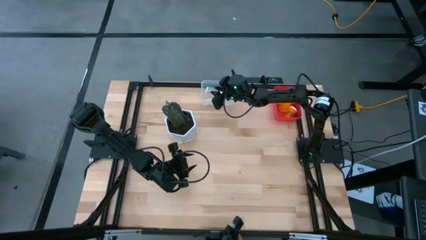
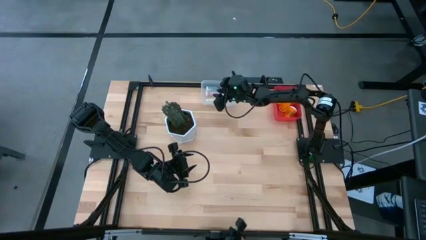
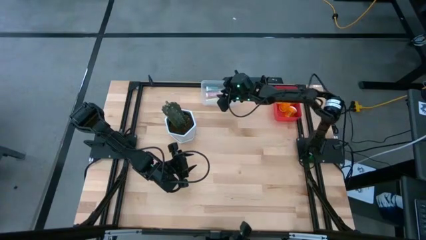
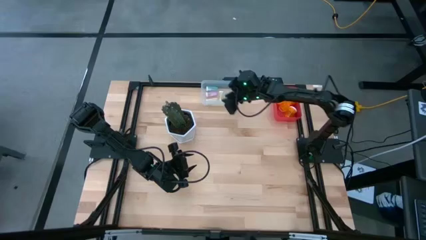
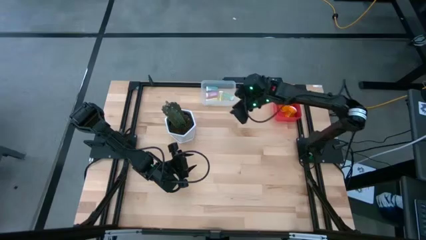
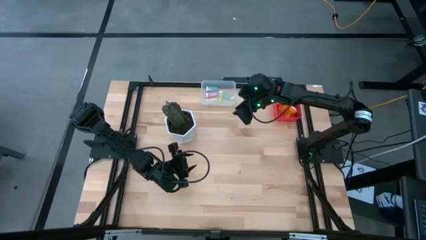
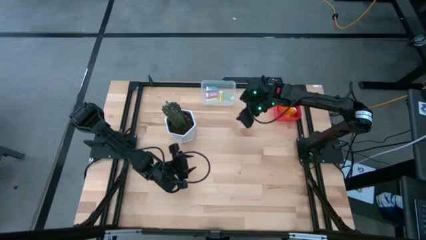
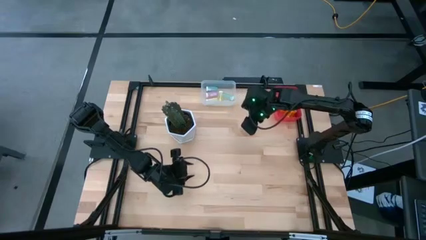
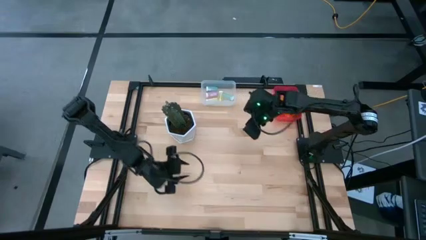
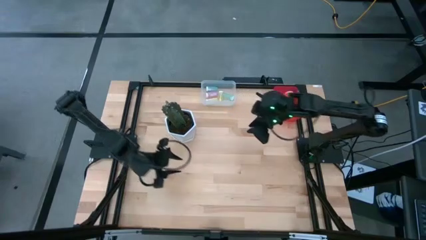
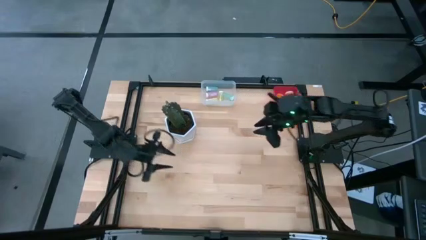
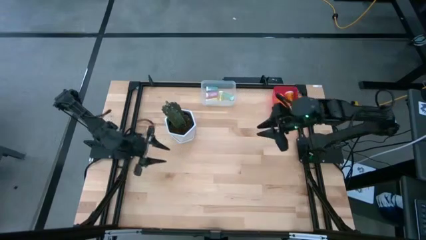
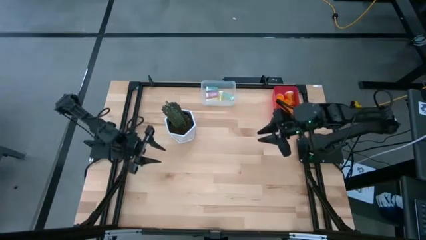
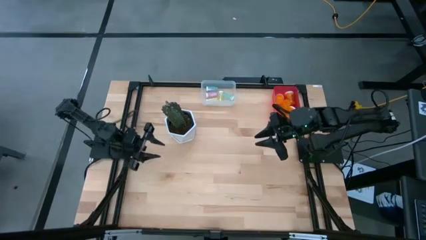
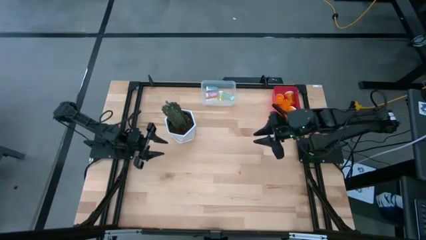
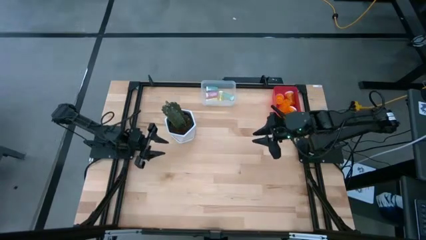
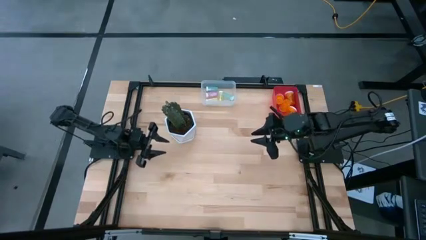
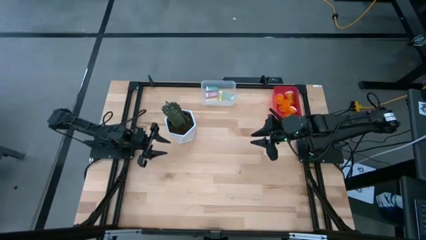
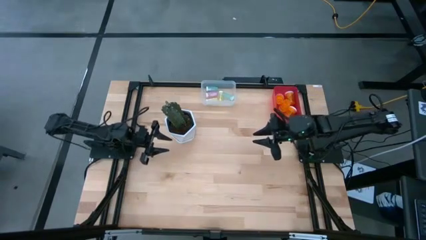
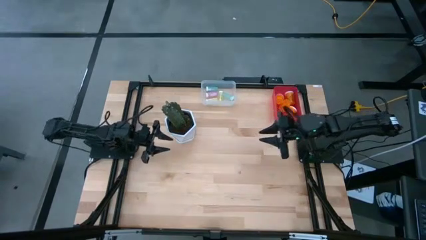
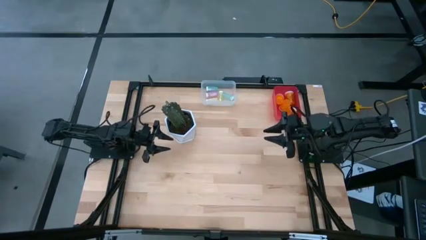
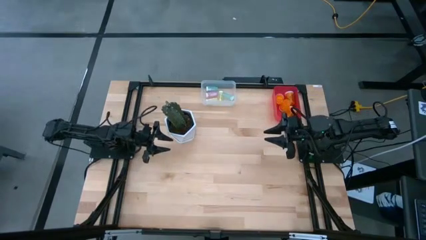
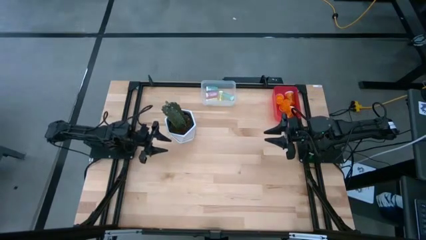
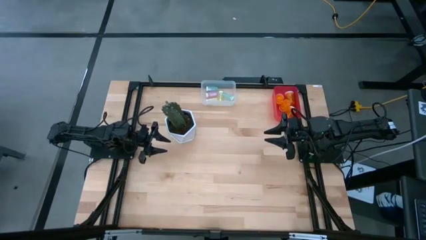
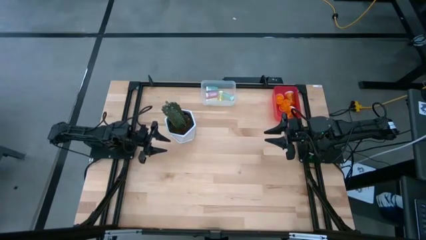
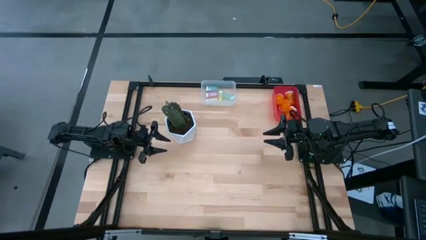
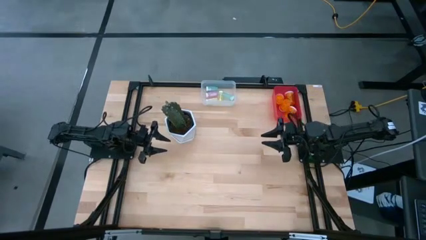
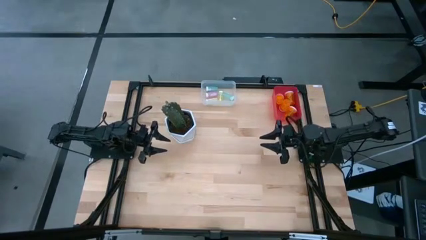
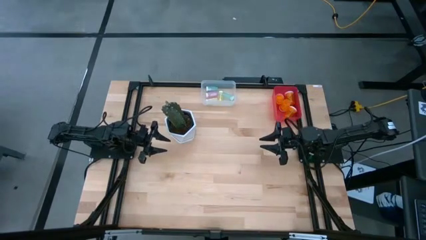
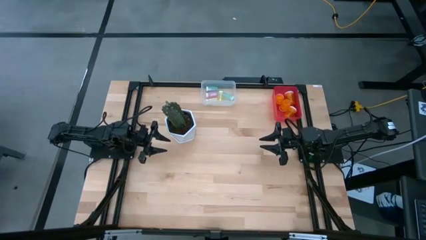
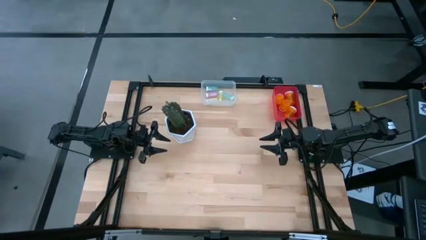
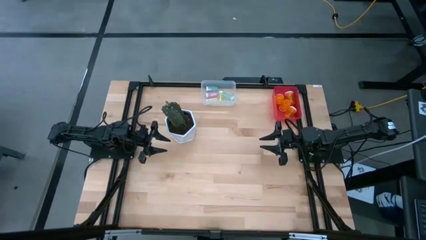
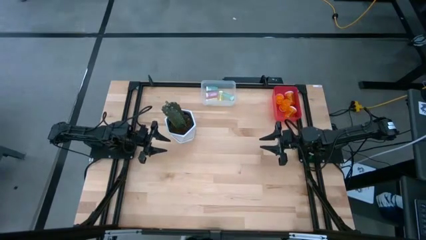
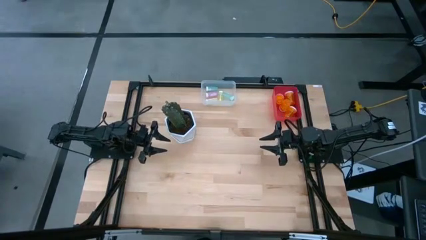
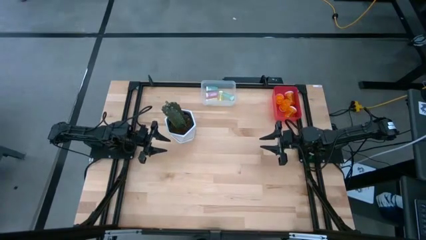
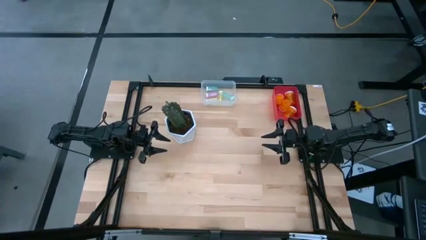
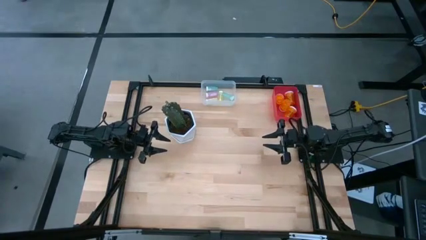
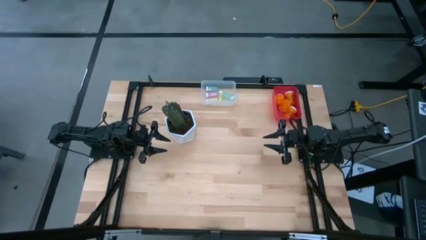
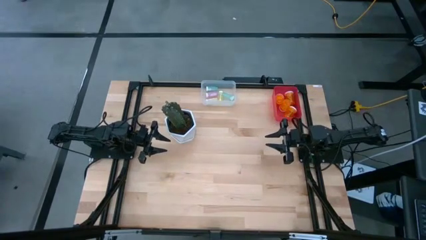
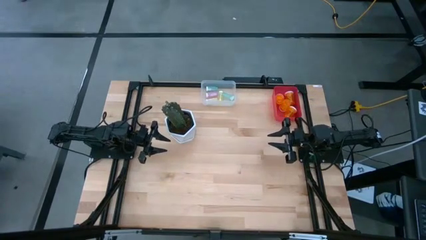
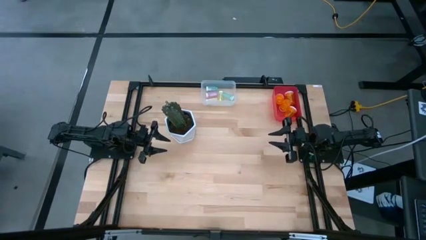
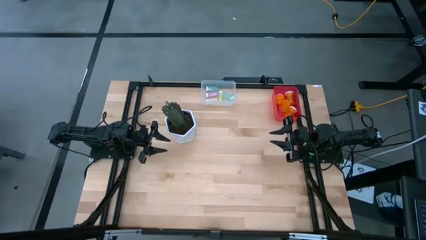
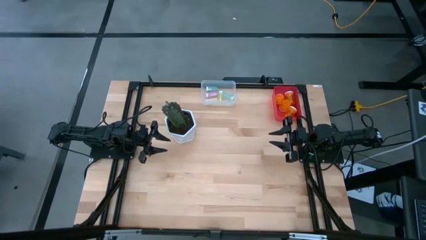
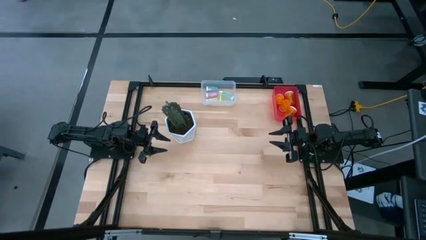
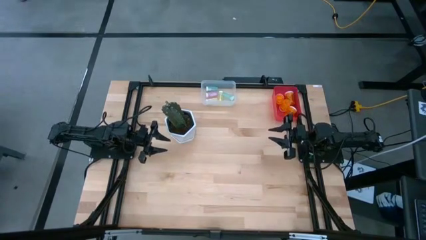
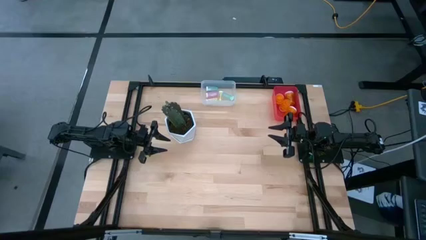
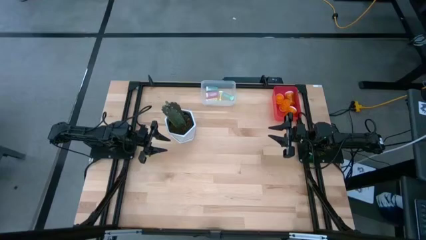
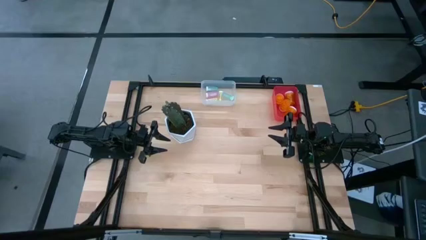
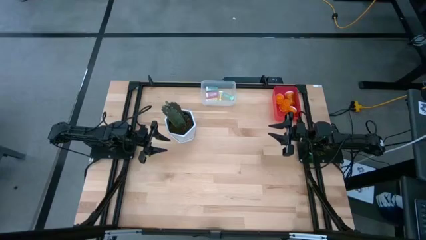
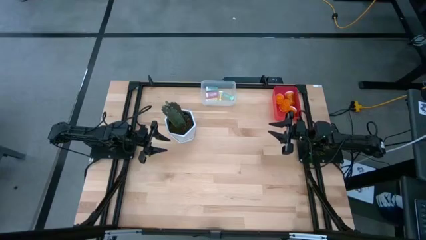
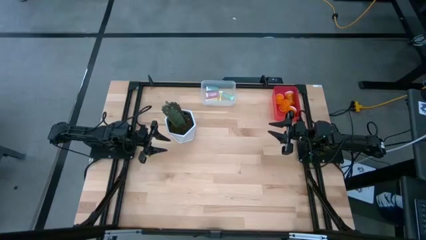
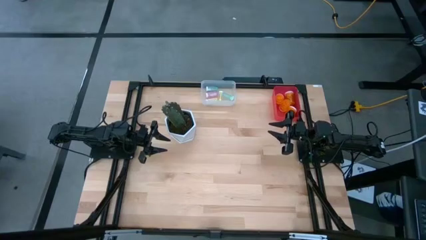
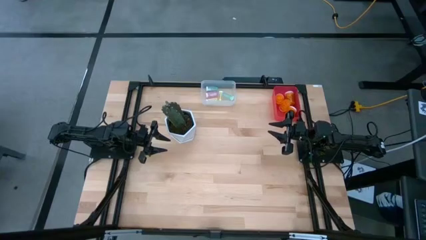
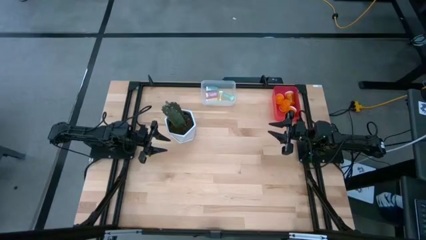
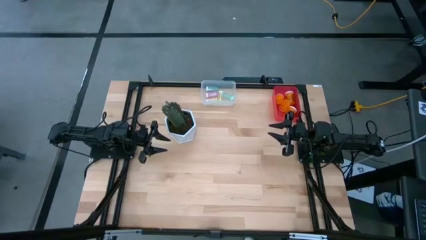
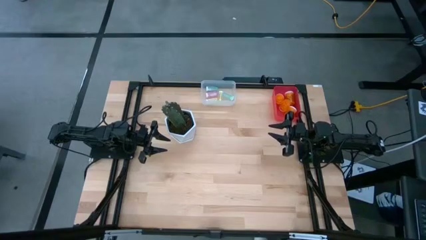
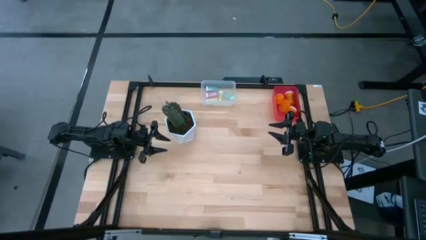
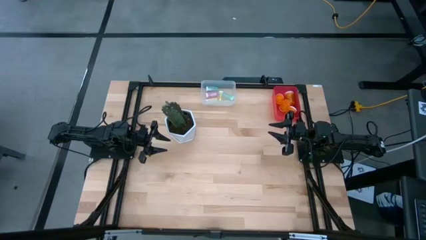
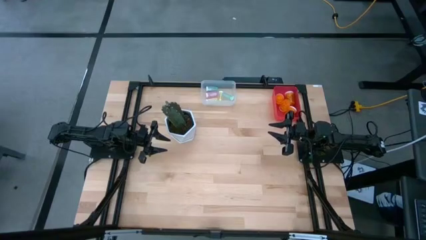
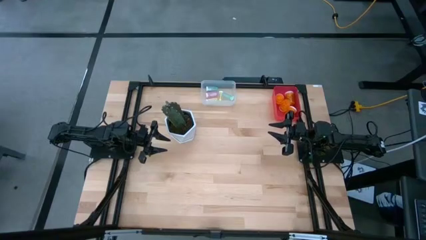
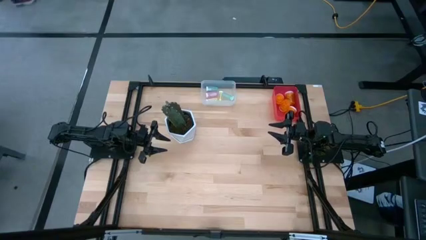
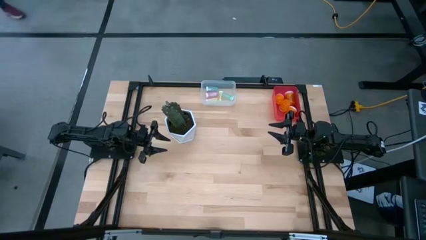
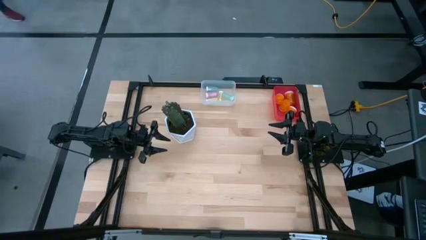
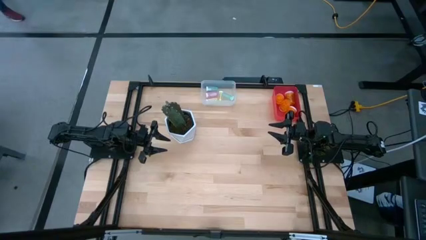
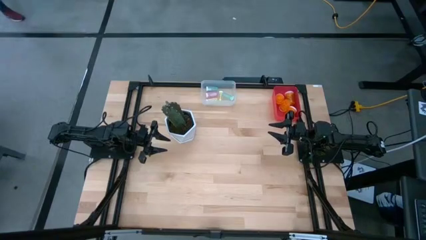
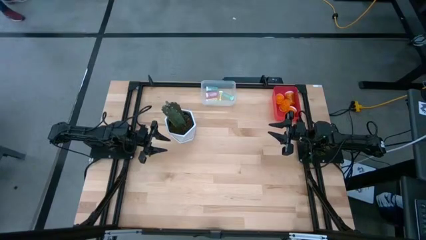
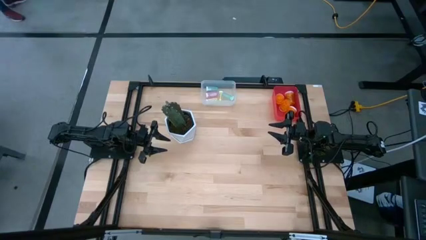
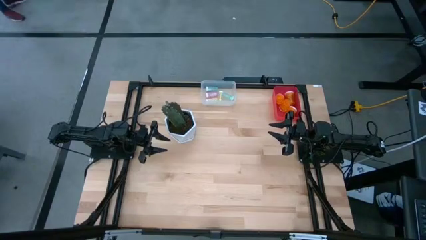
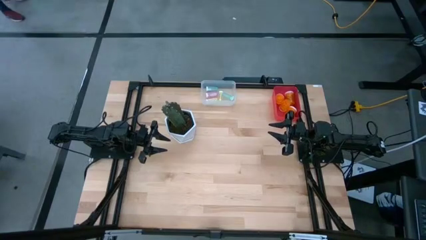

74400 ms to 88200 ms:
Task: Pick and place medicine bottles into bin by pill shape (circle, oval)
Return to Home Position

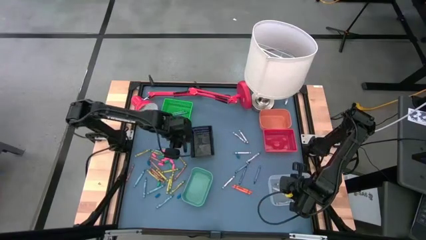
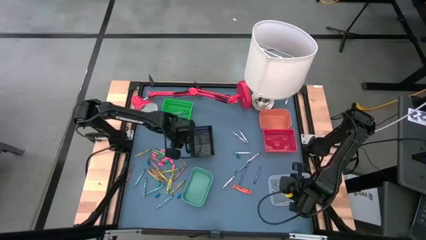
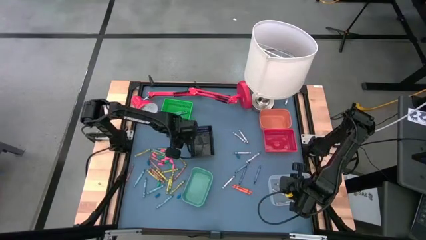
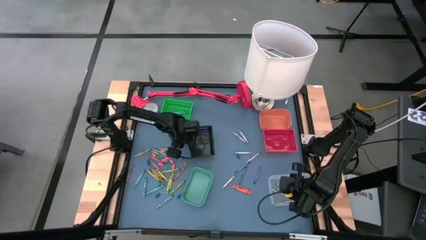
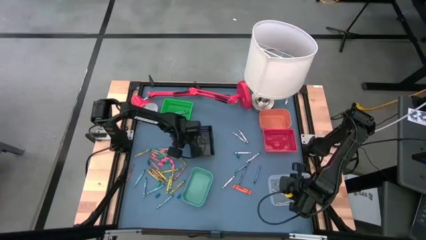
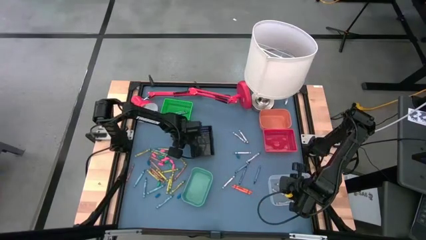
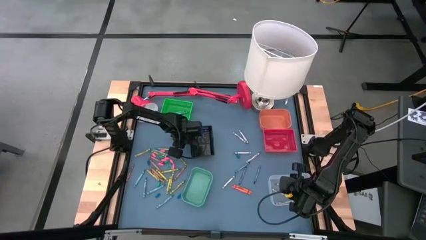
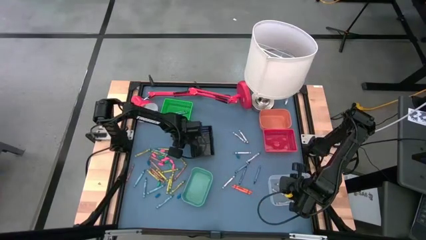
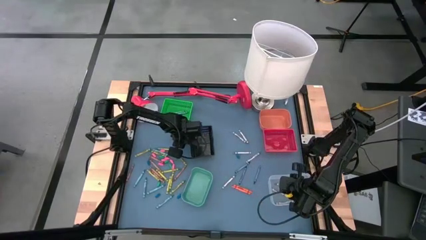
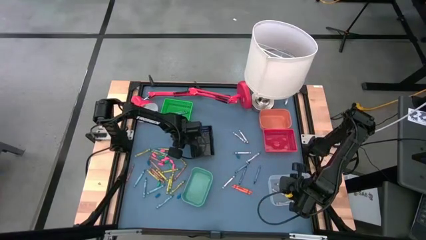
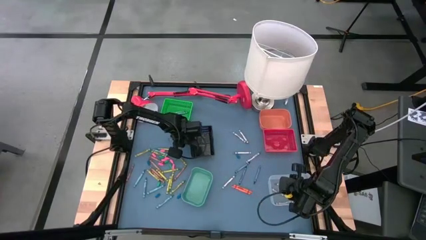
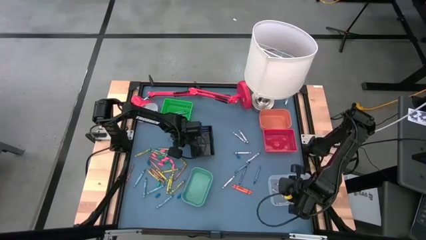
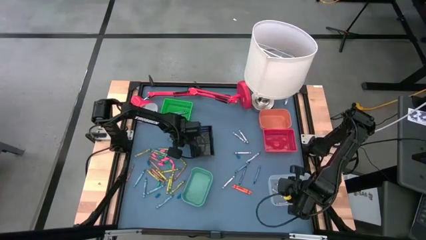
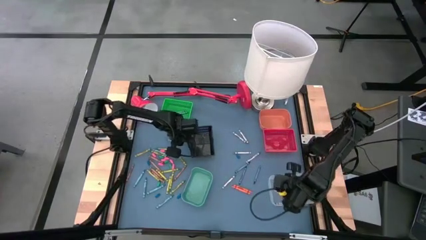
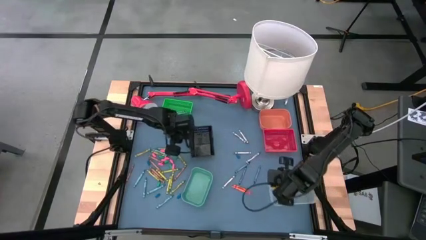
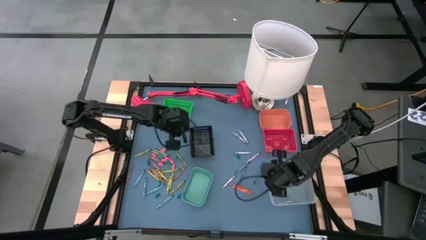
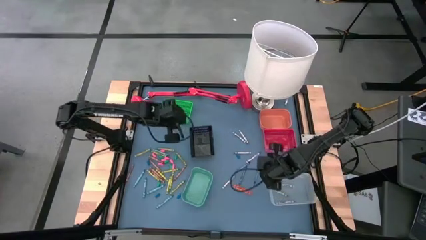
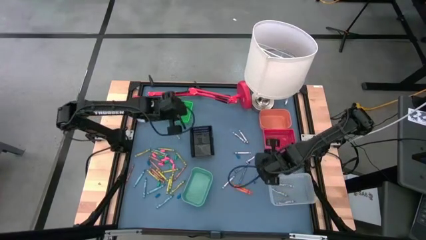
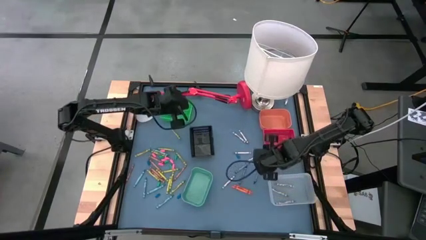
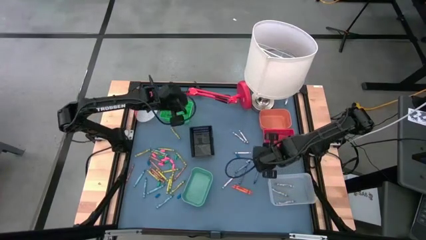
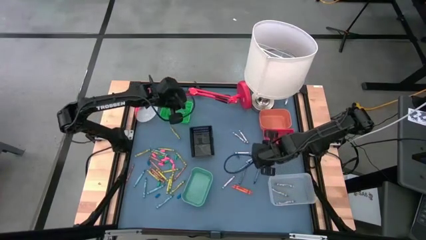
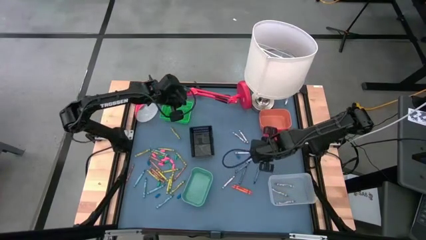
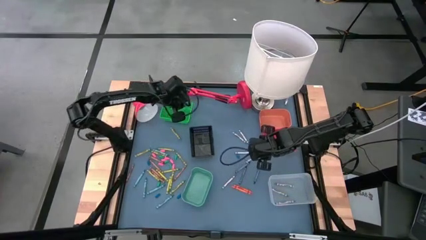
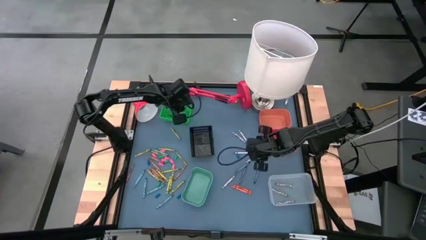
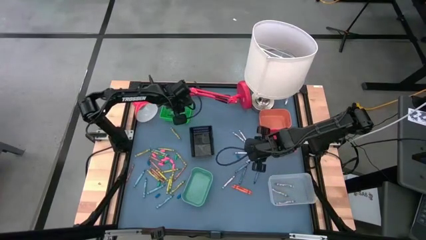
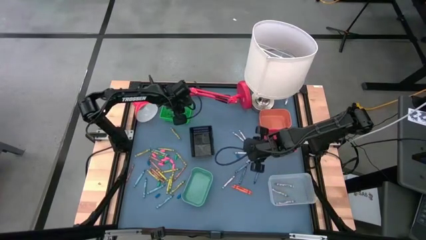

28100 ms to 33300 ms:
Task: Sort crayons
Put the blue green crayon into the green bin
